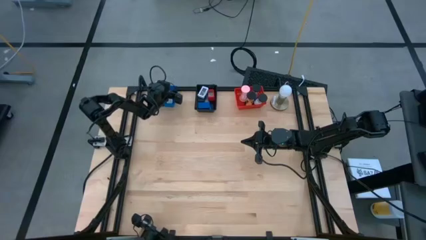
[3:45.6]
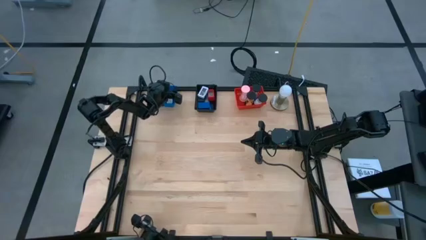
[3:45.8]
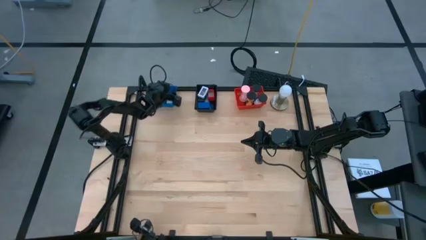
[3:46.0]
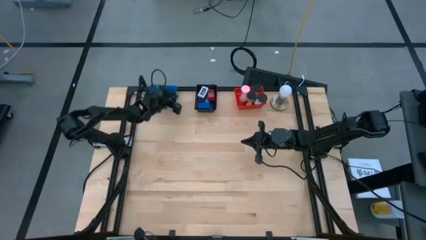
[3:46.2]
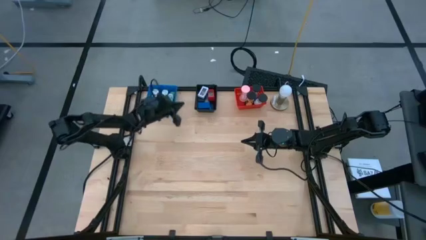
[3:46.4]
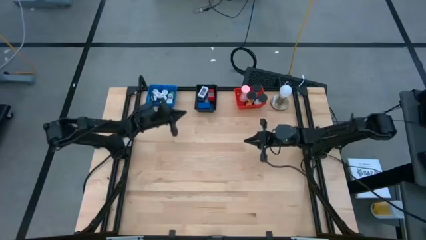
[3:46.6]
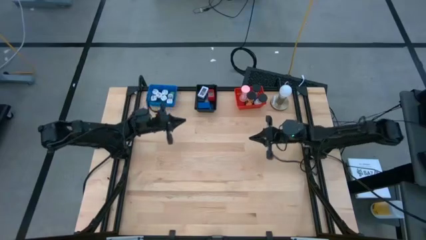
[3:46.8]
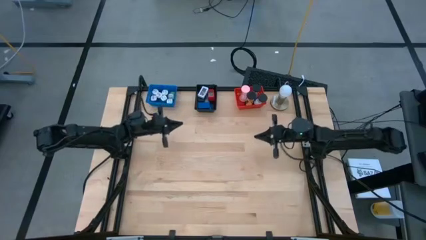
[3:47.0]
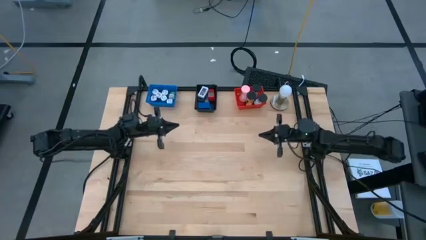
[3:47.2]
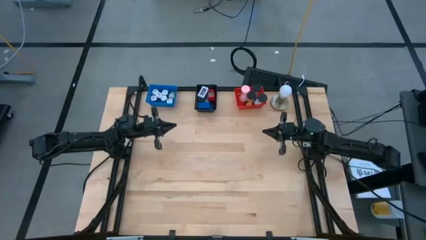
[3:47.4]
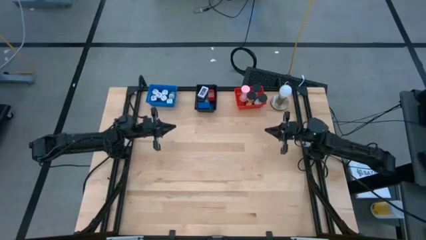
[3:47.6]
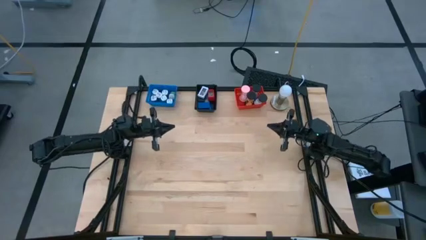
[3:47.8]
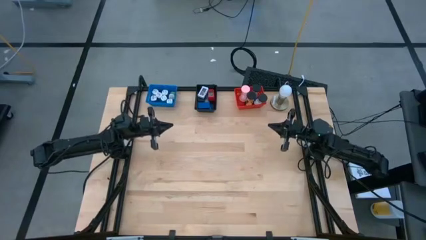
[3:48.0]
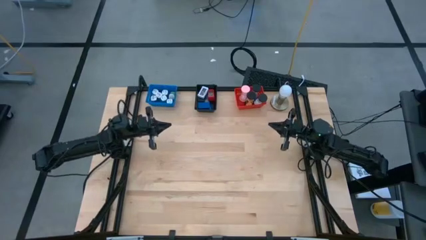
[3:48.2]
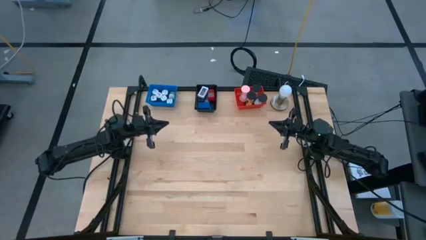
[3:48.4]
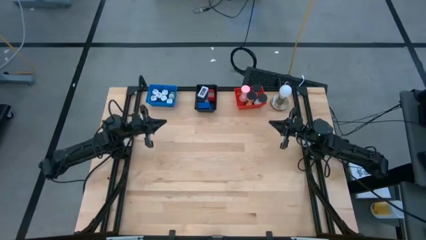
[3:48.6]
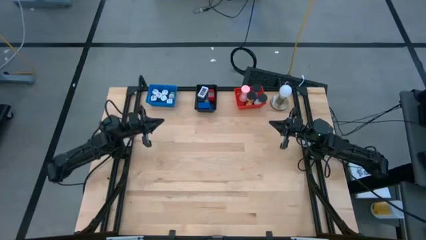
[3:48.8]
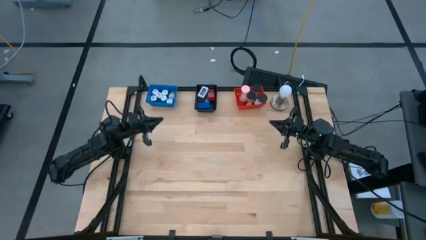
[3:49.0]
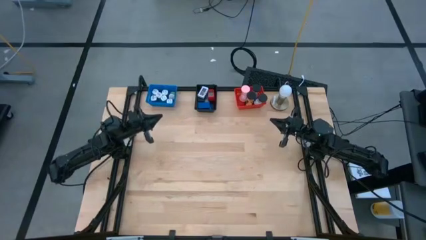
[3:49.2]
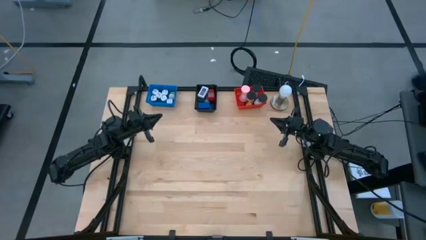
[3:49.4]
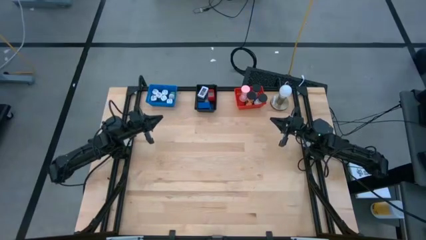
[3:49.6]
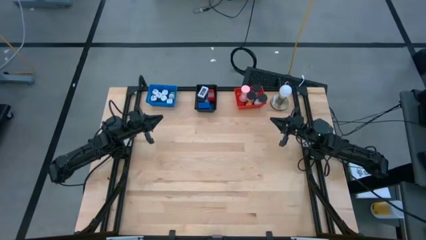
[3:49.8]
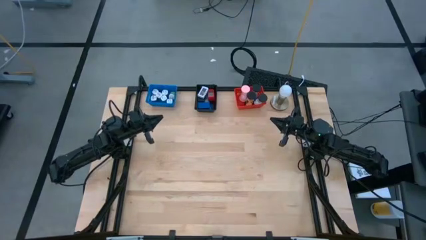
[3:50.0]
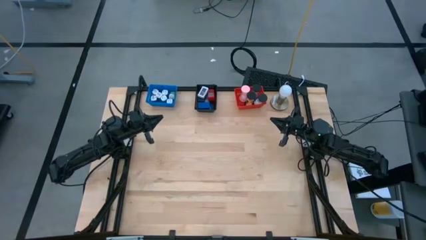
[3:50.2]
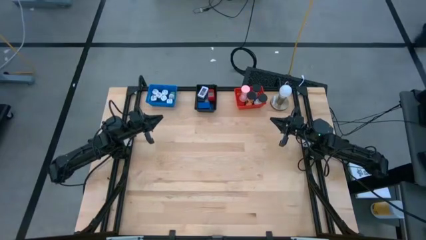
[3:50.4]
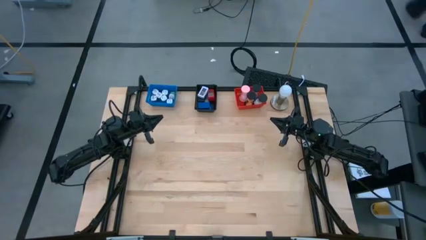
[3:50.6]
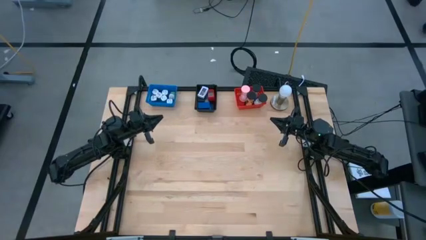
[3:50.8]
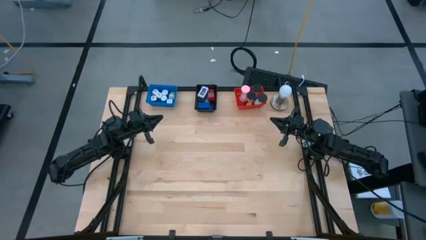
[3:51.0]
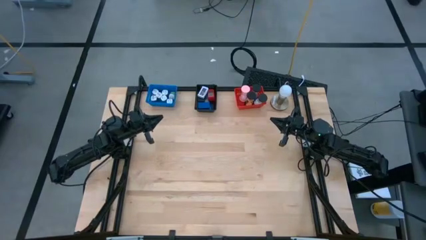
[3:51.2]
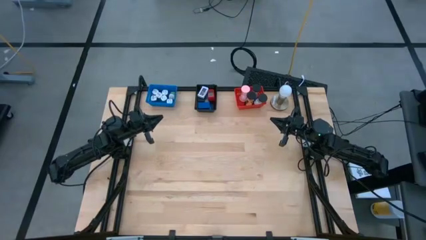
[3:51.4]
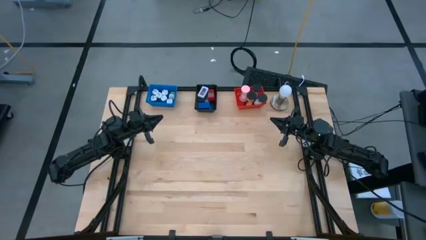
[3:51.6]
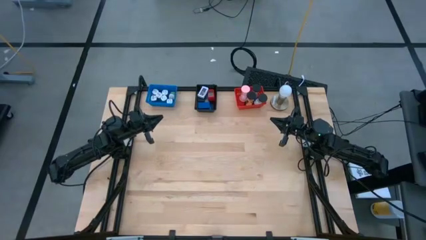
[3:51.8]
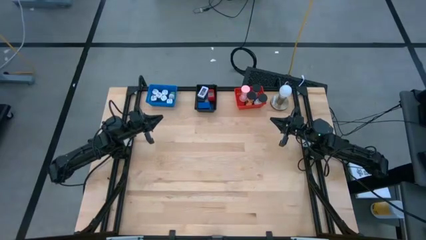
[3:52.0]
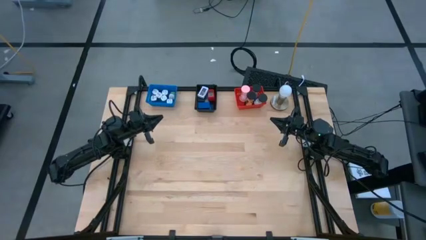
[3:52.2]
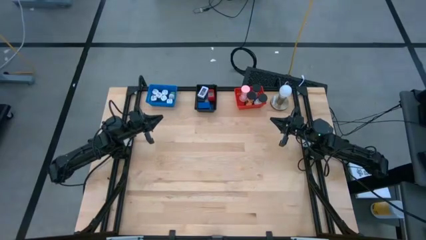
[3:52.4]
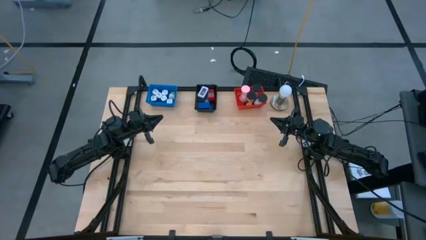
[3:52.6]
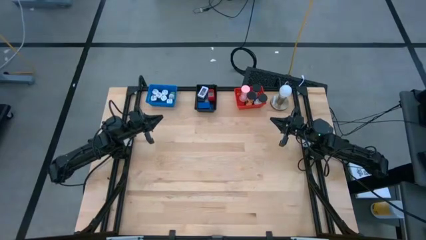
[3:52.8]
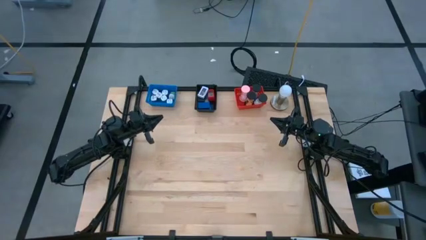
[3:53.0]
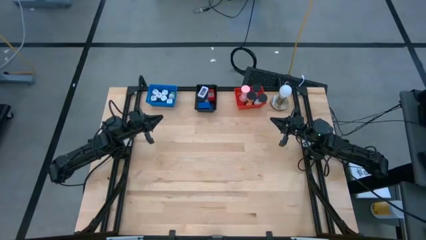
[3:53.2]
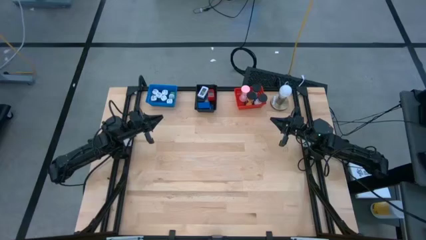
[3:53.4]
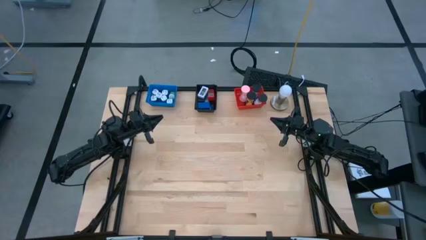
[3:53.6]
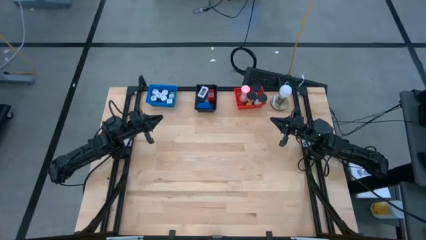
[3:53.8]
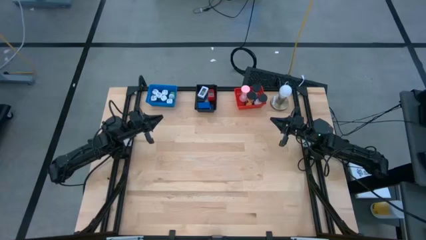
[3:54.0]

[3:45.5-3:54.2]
Task: Pick & Place Office items
Return to Home Position

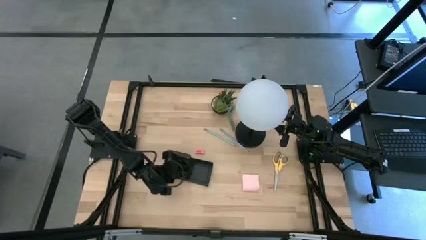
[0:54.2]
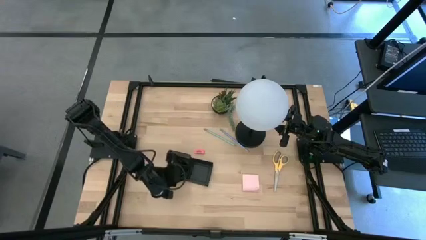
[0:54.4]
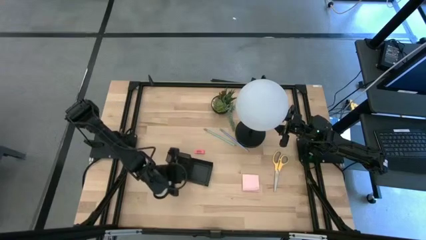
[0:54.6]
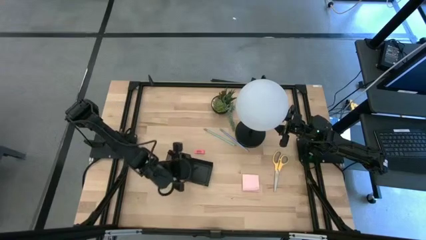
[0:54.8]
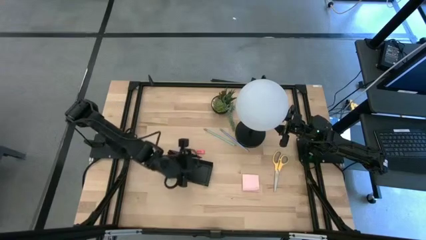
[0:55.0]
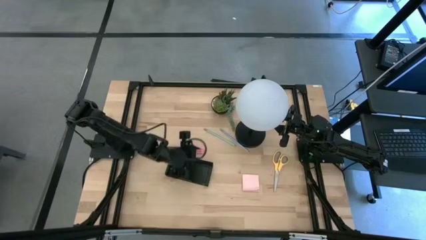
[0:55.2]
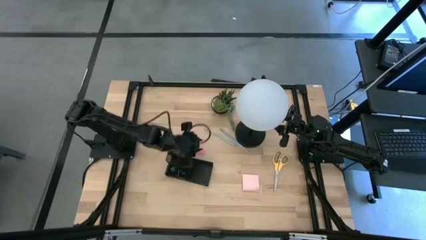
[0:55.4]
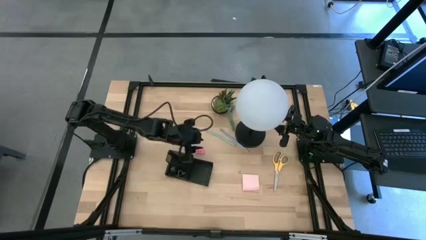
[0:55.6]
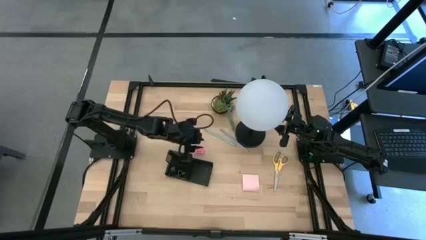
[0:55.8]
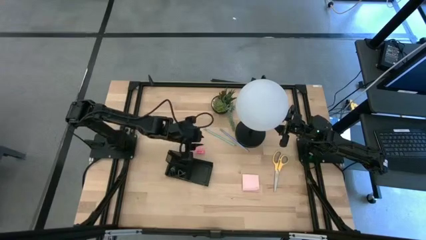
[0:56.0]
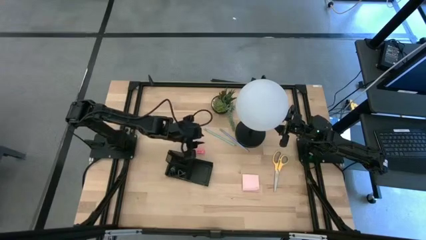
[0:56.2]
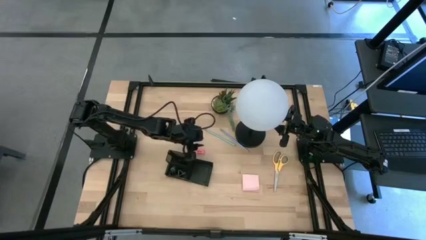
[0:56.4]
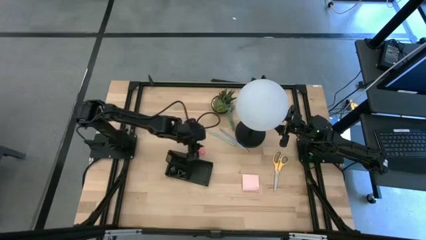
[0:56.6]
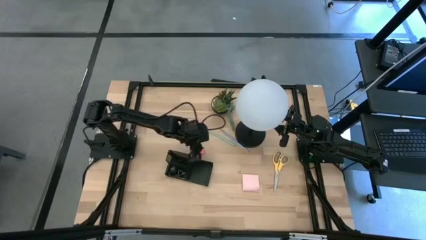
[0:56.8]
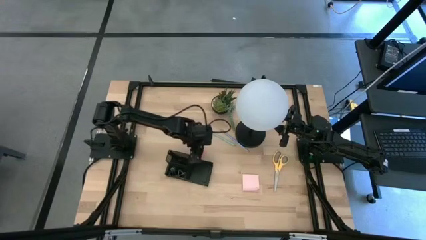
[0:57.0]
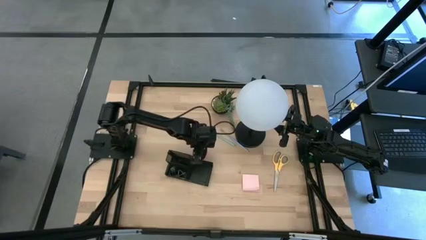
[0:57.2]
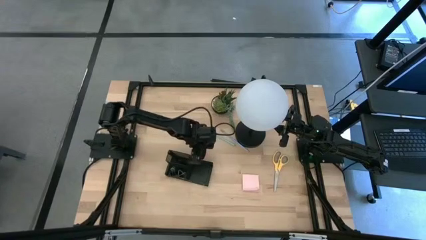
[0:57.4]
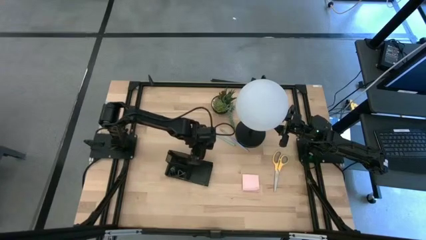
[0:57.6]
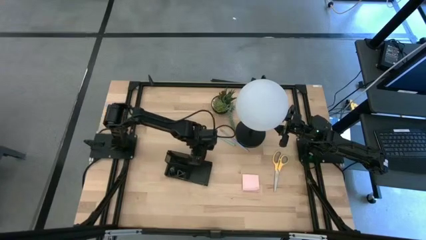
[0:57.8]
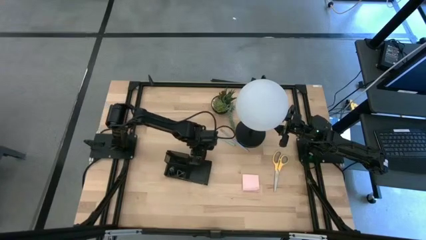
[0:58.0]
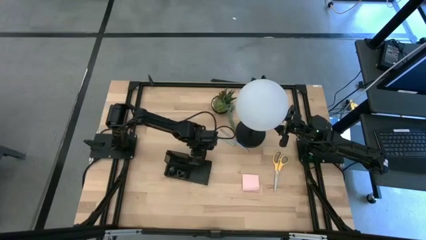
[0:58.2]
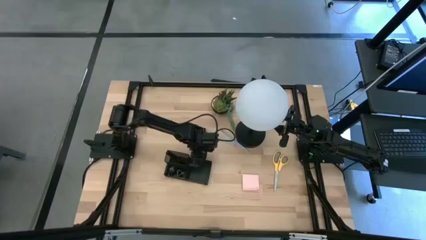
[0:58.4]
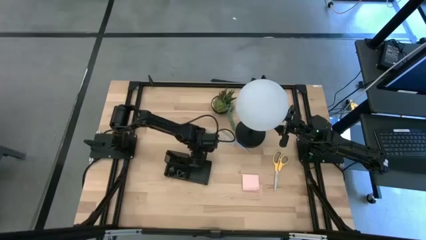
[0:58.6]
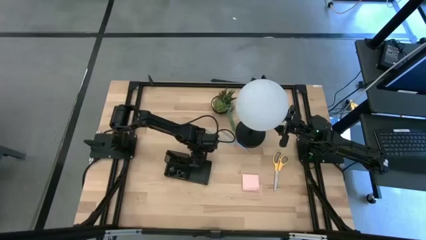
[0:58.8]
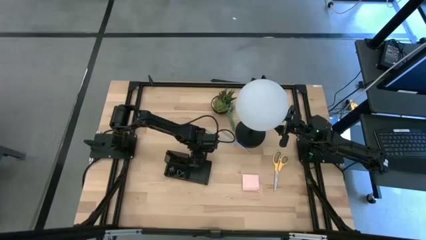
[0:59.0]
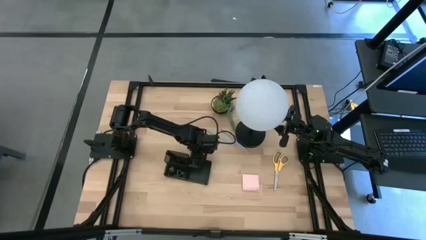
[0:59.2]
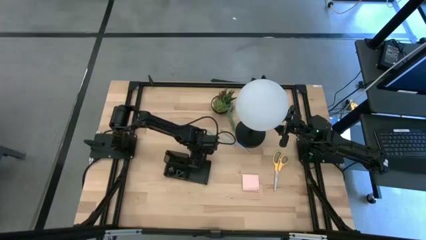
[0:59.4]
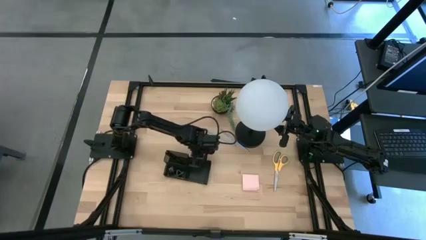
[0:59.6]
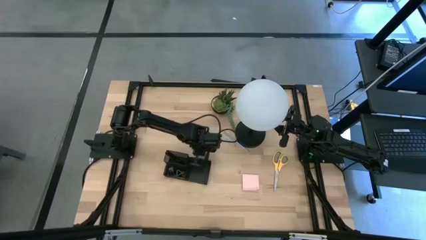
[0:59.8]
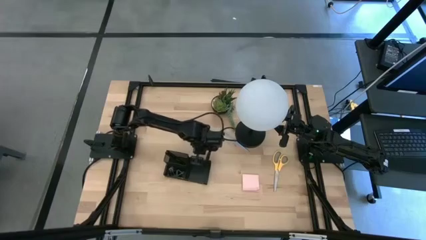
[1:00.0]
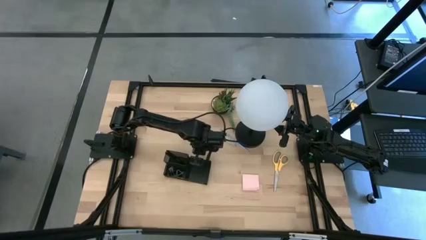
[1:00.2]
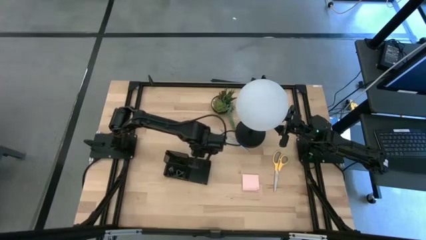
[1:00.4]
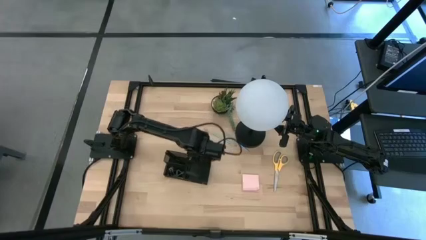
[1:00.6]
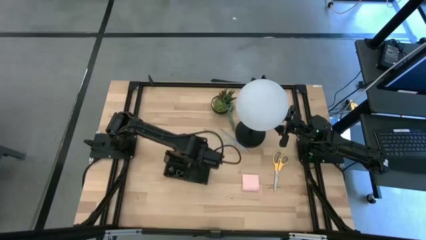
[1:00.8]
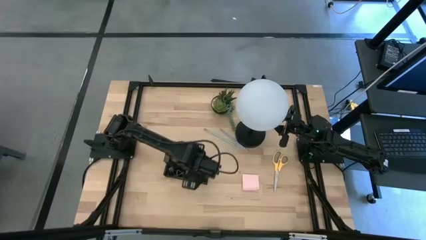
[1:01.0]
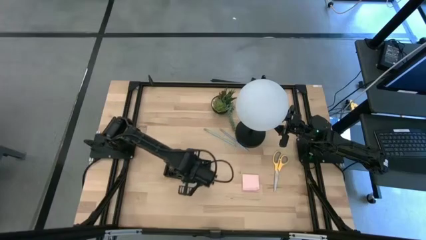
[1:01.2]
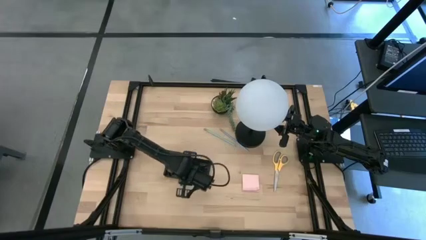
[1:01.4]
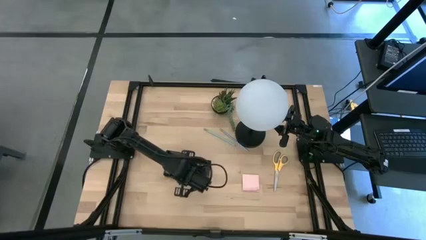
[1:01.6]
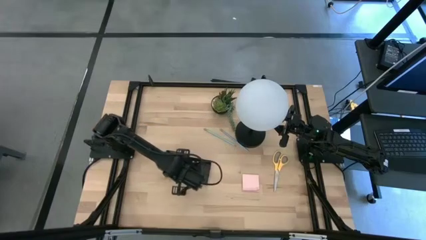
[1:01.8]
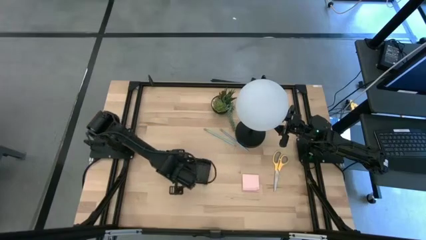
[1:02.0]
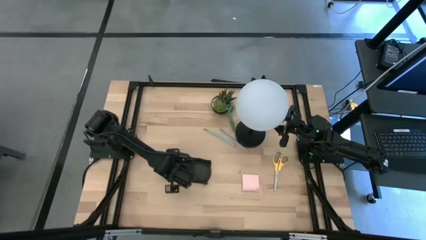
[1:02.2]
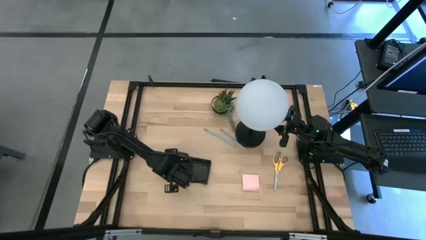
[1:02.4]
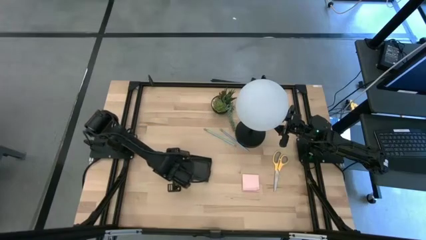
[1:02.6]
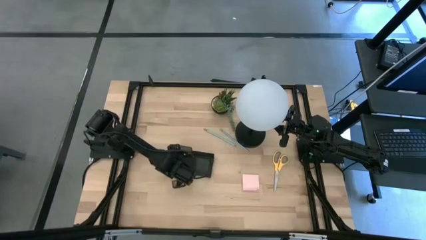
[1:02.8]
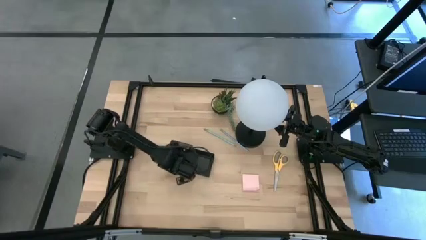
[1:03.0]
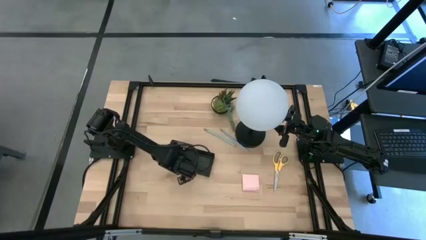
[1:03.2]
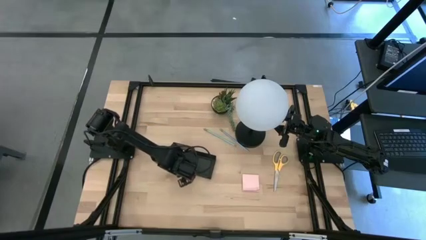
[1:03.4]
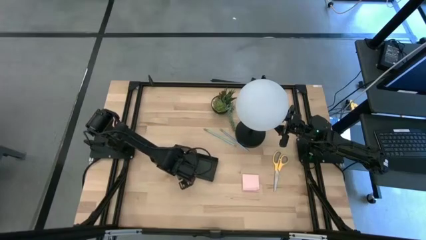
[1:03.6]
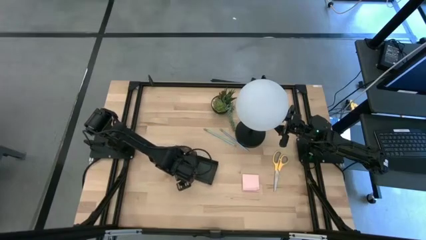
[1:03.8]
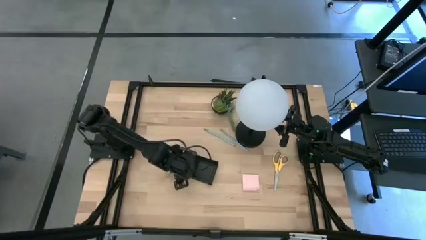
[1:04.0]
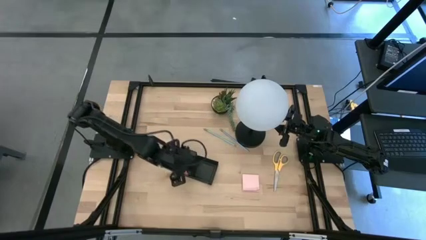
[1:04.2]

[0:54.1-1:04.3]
Task: Pick and place office supplies into organizer
Put the eraser into the desk organizer
